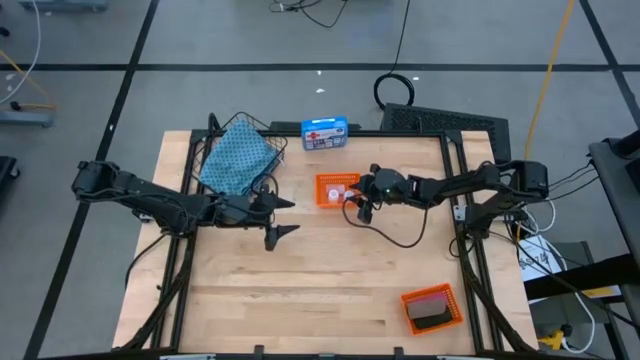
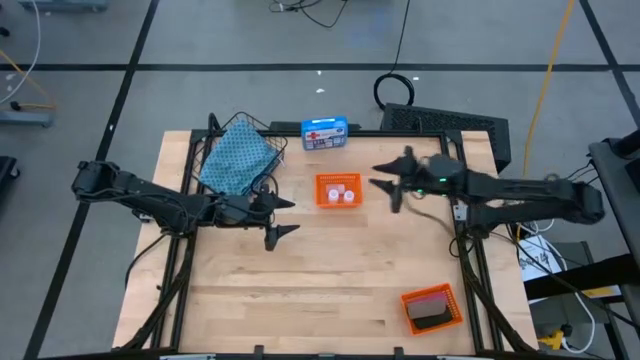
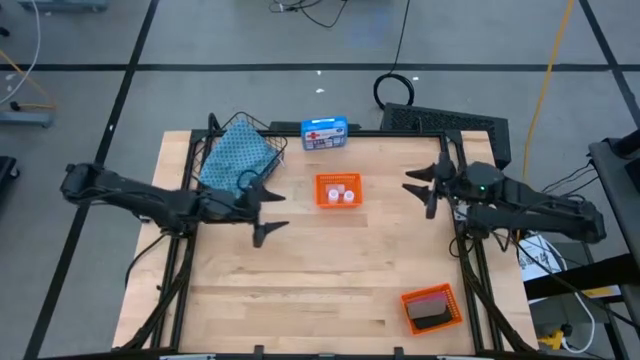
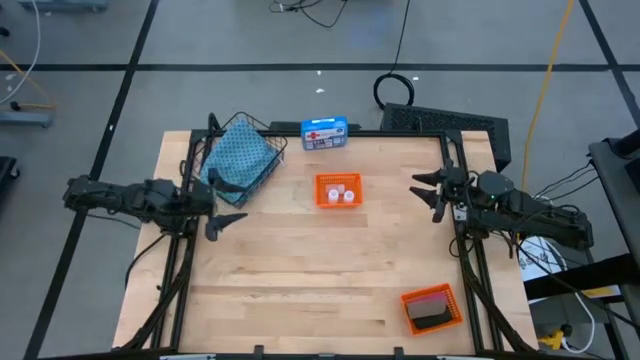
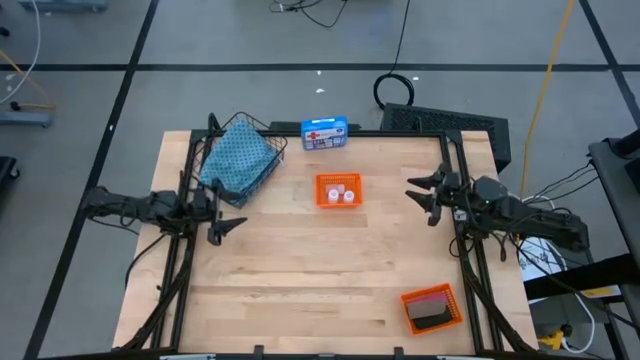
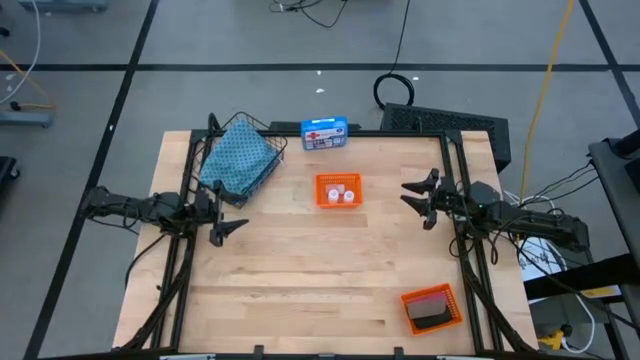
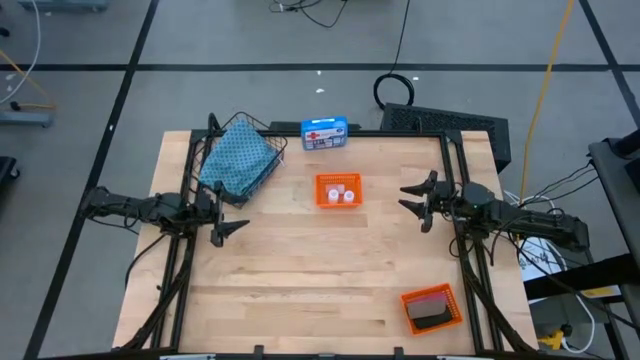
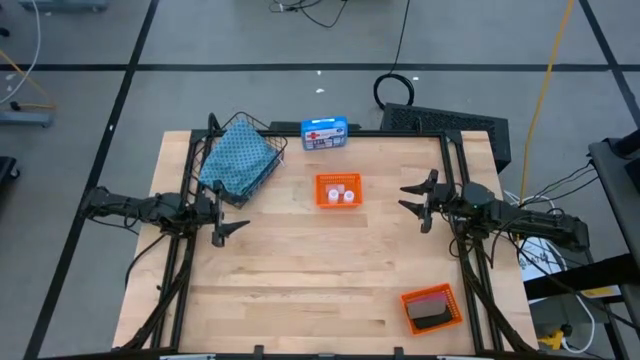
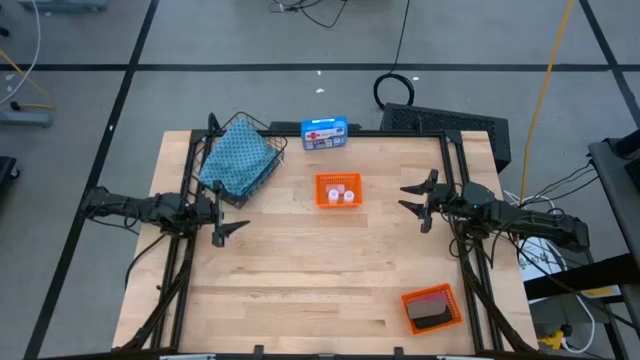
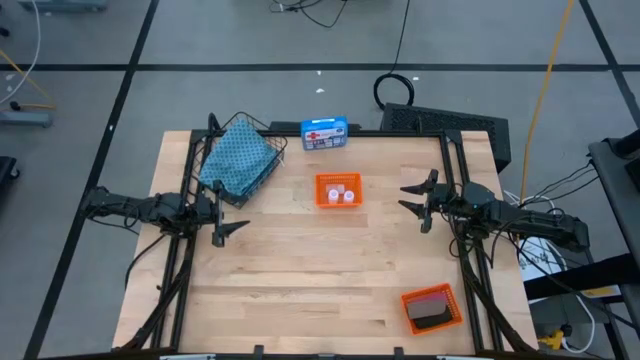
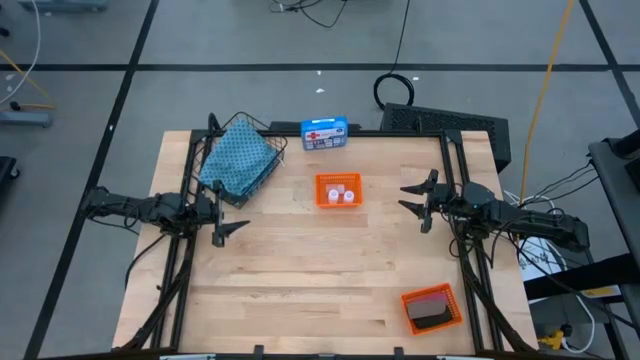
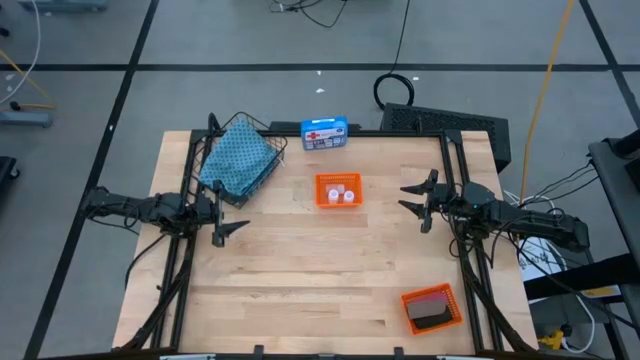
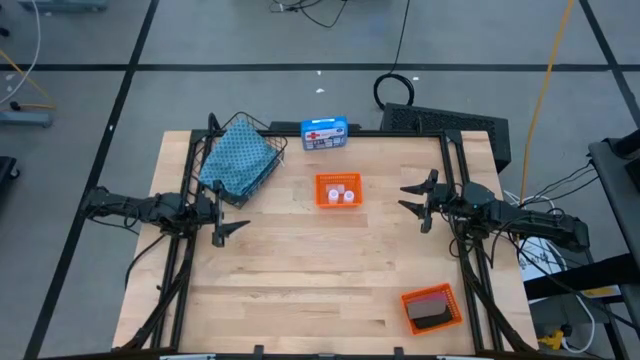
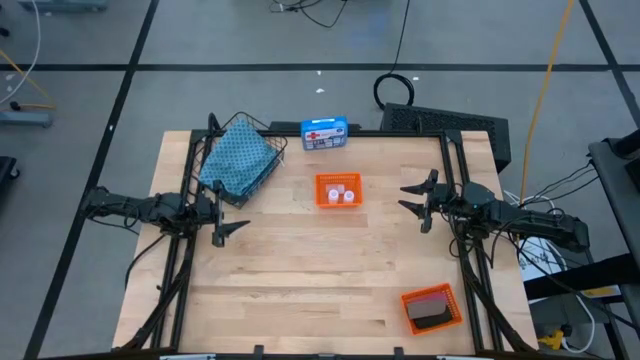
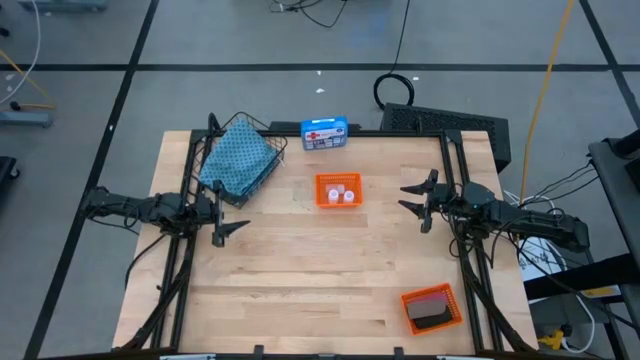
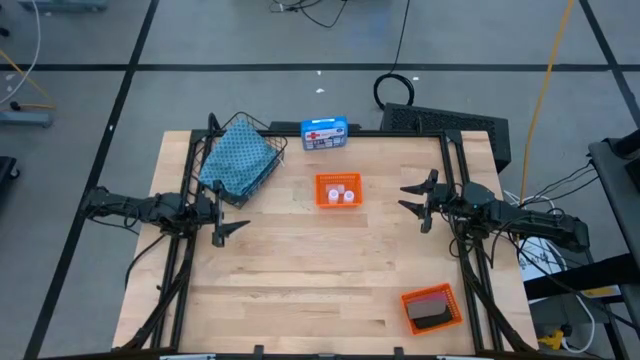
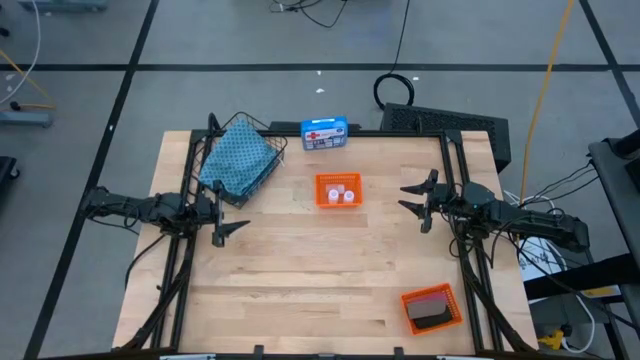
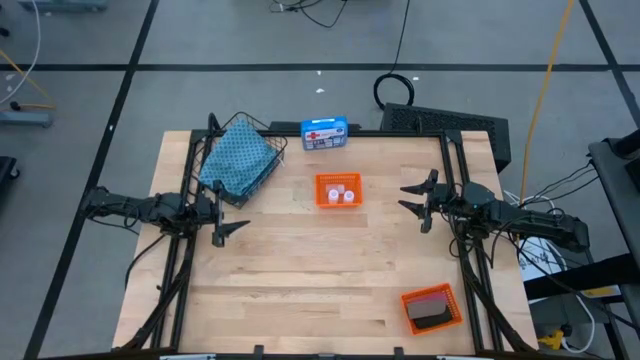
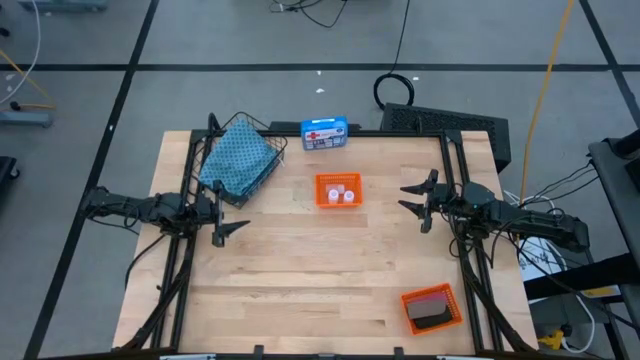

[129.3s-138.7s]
Task: Pick & place medical supplies in basket/bin
Return to Home Position

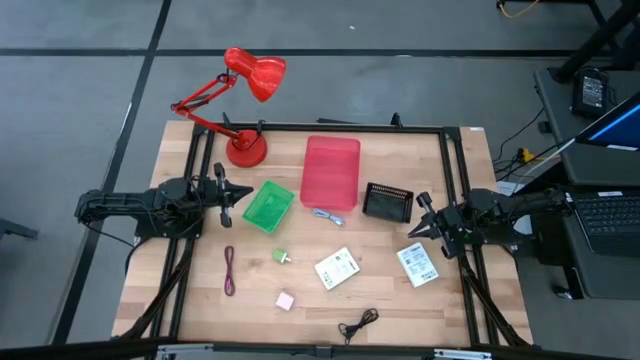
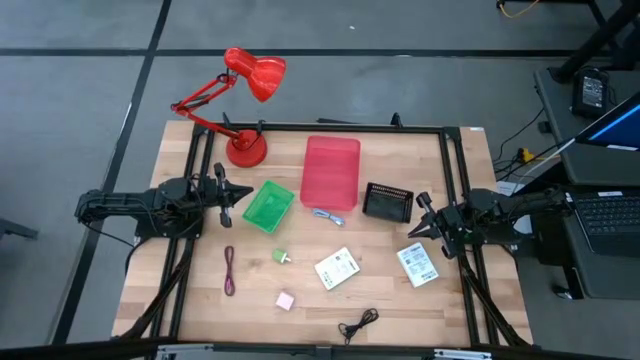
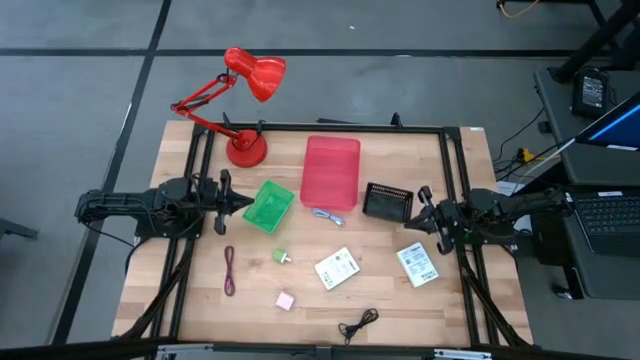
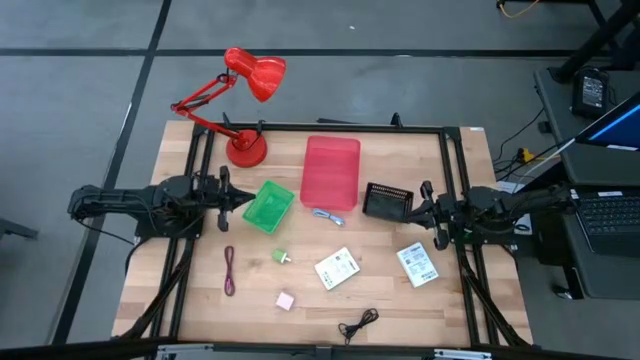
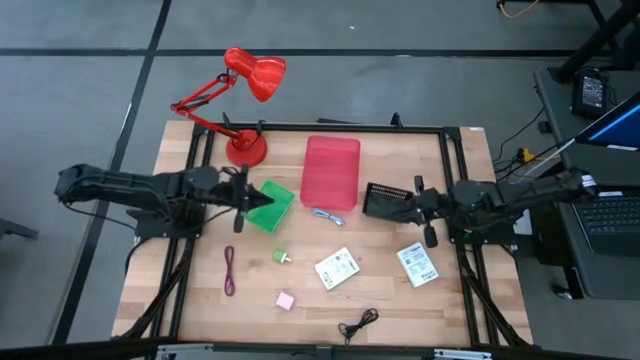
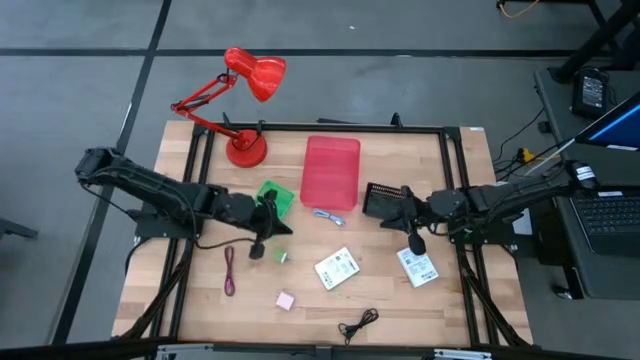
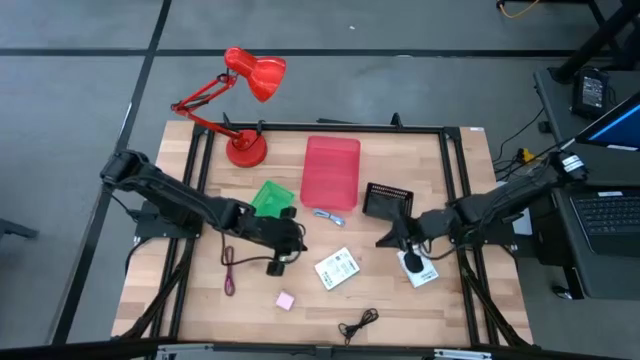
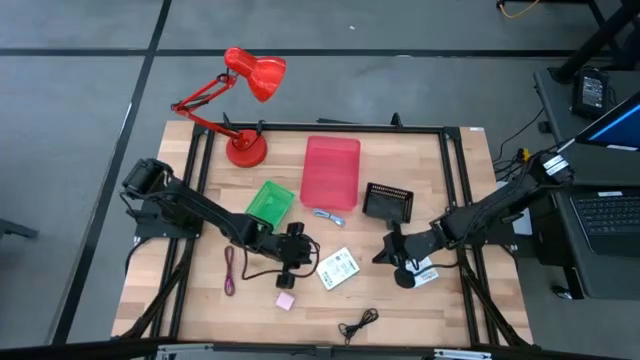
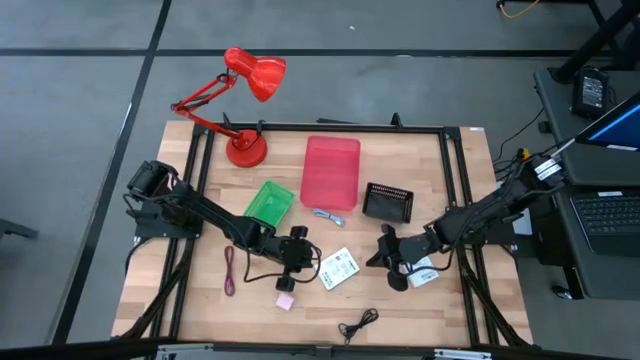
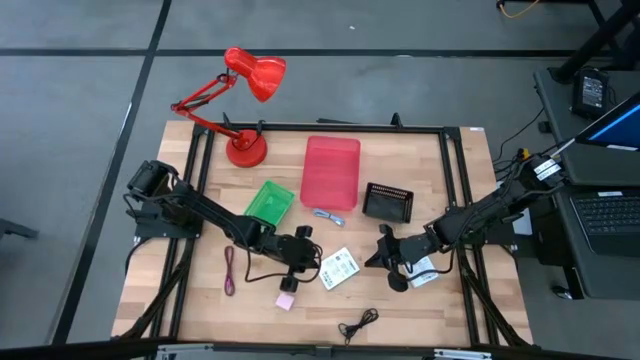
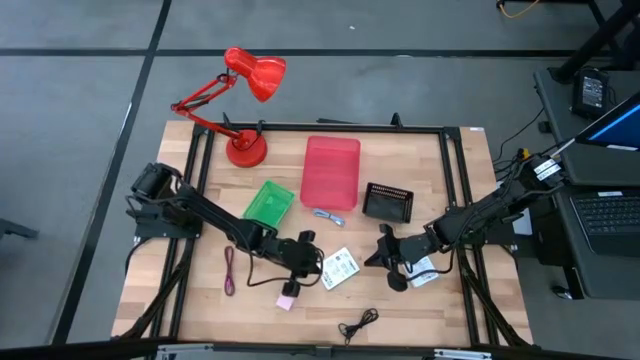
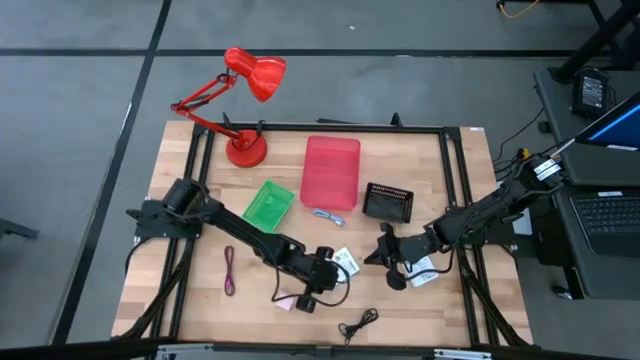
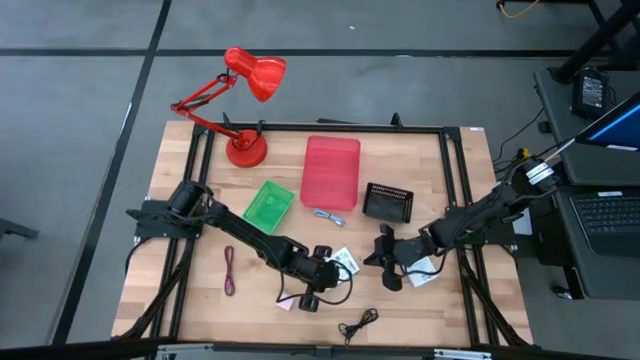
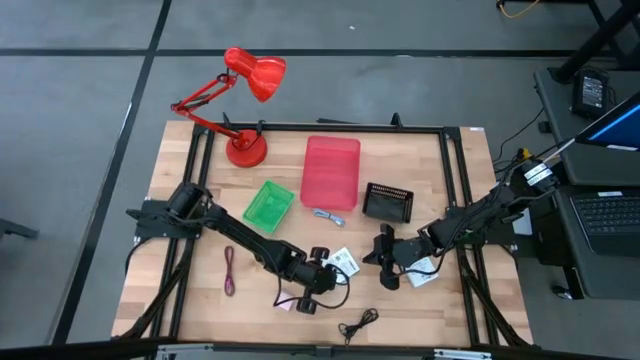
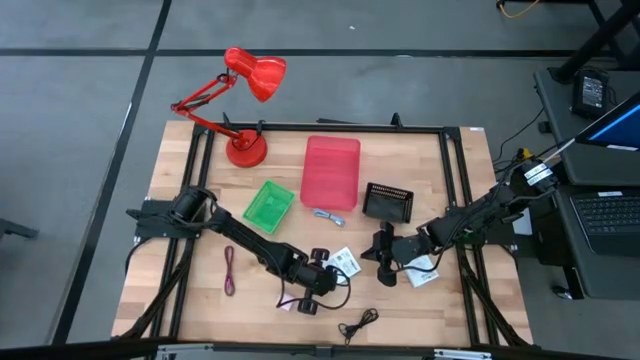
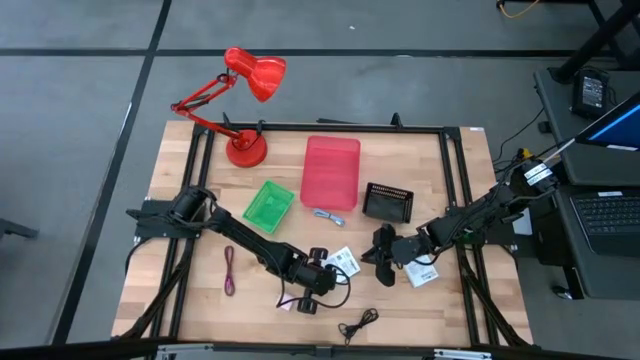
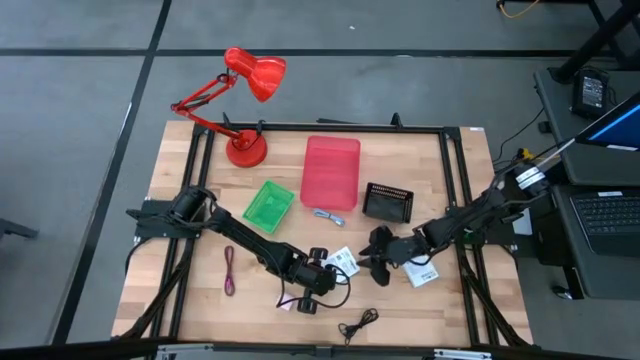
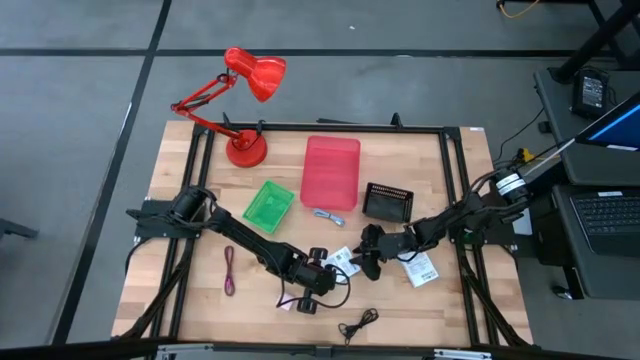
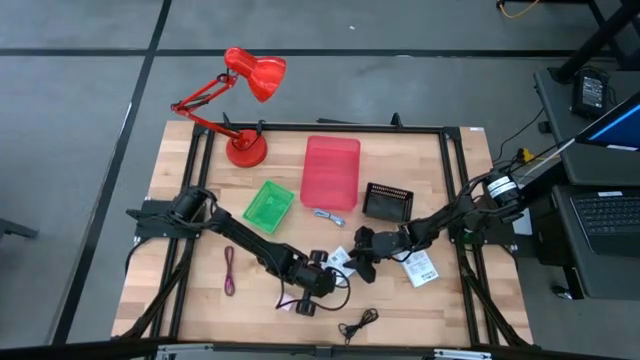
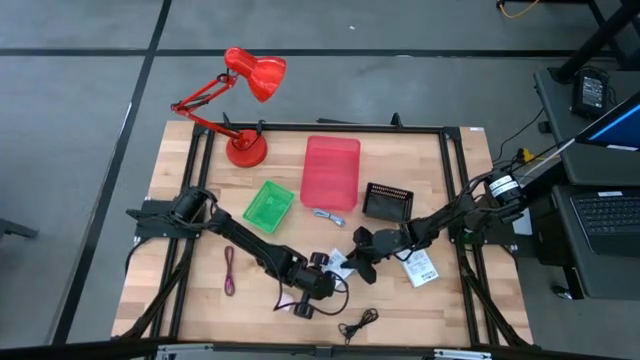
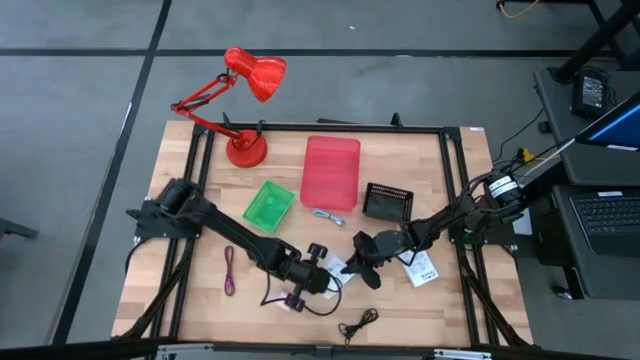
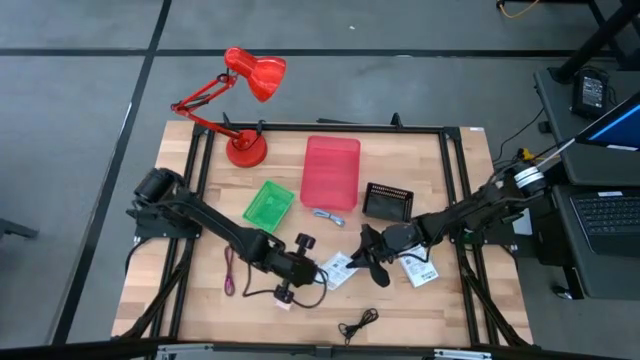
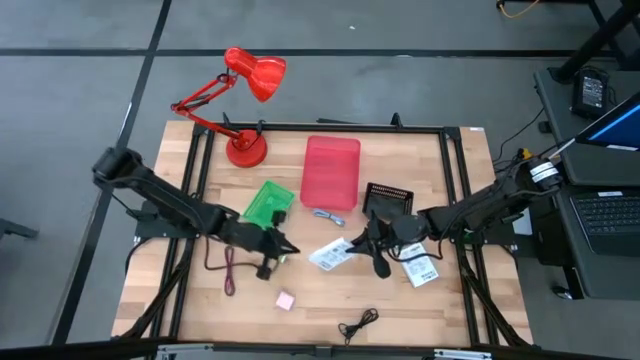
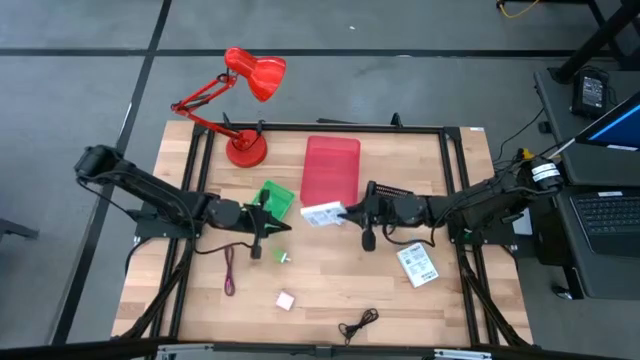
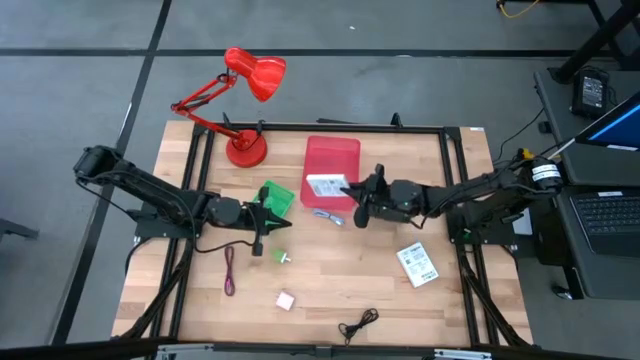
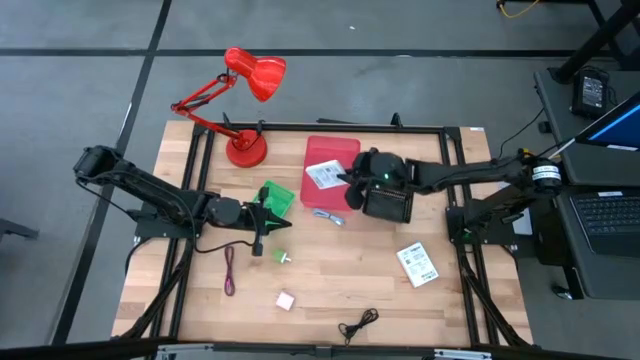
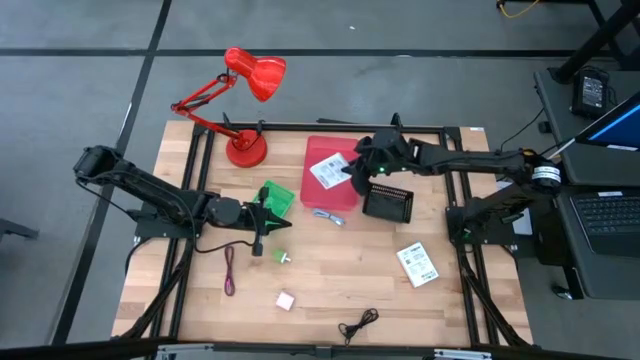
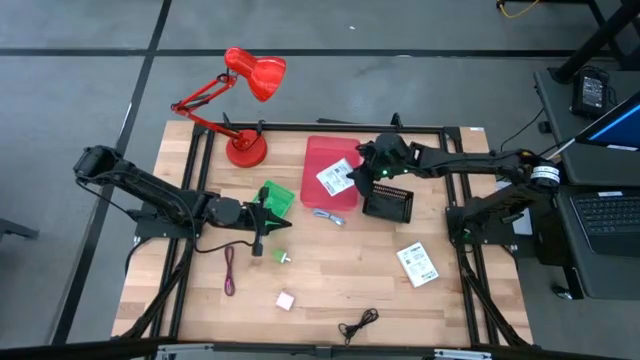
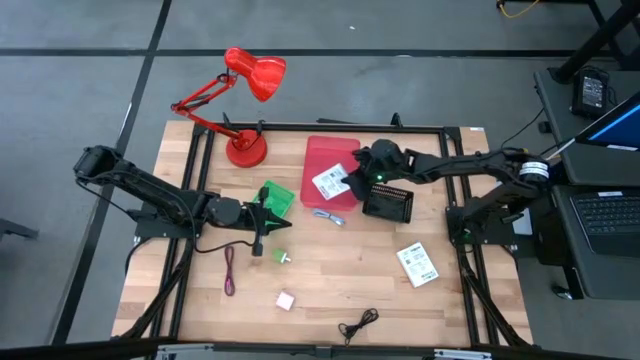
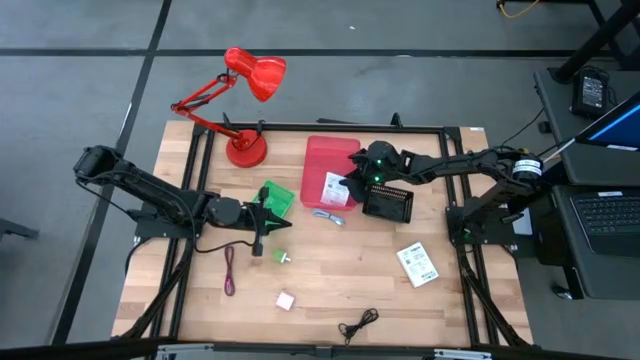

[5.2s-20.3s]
Task: Pick and place items into bin
Put the left card reader box into the pink bin
